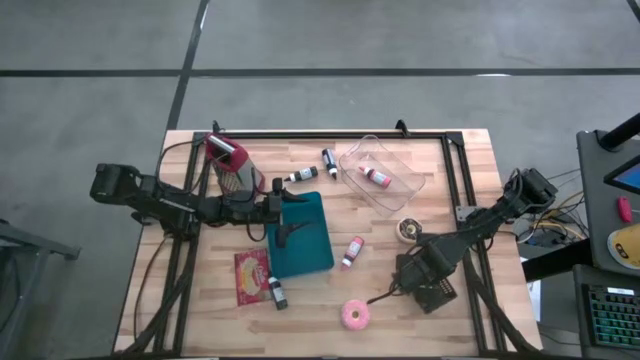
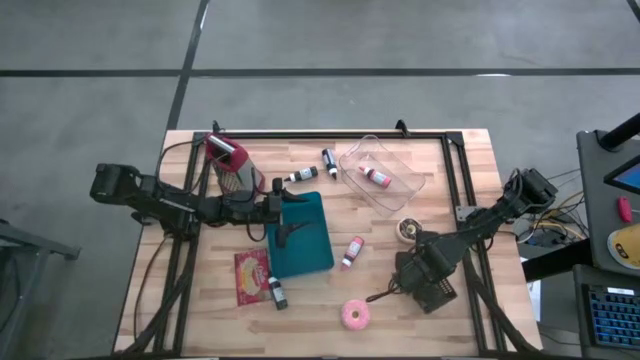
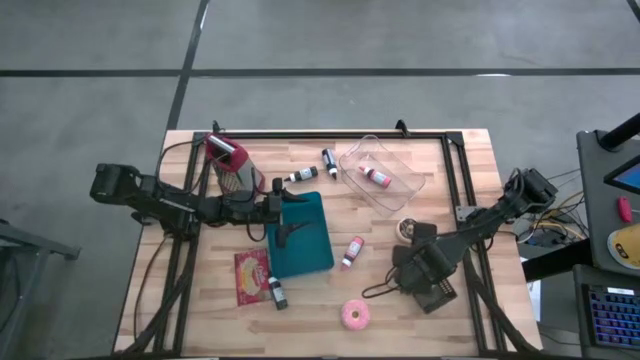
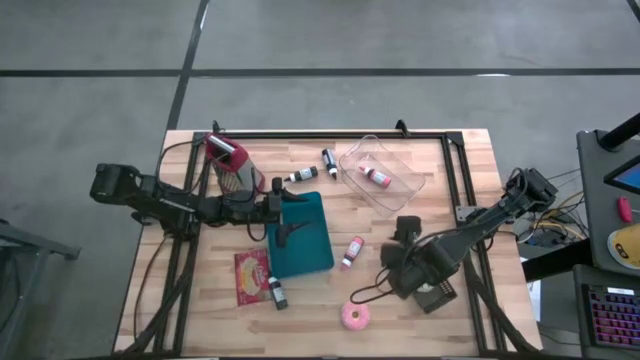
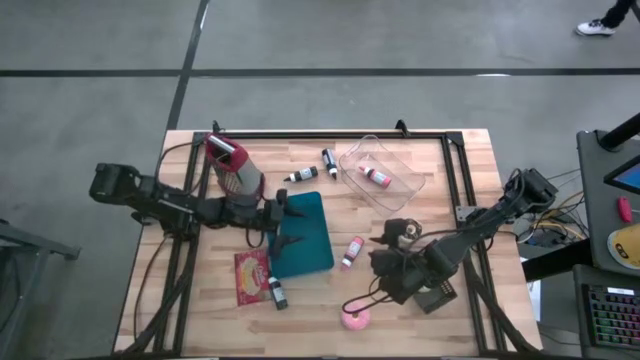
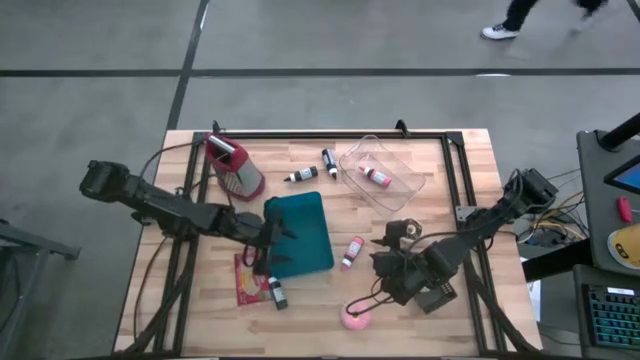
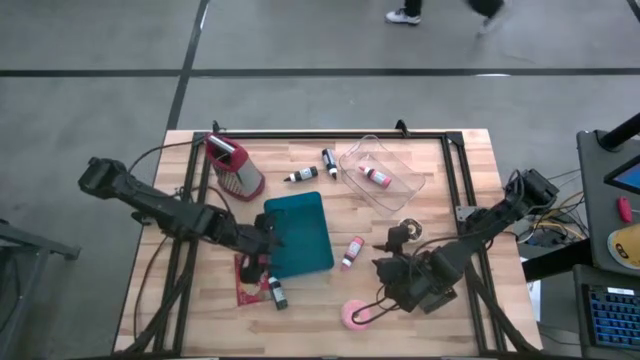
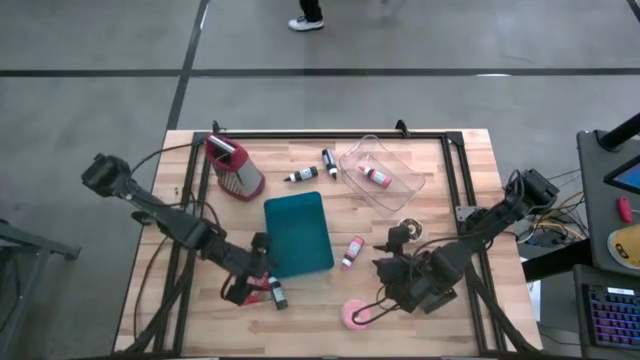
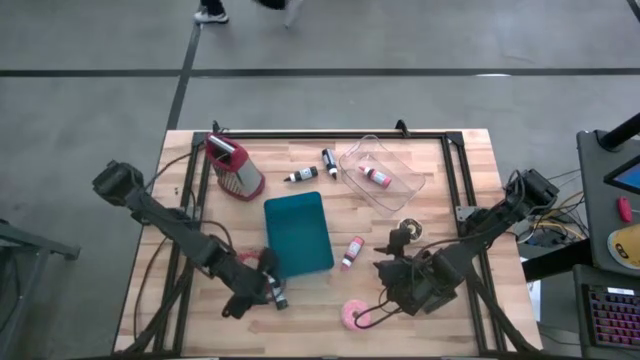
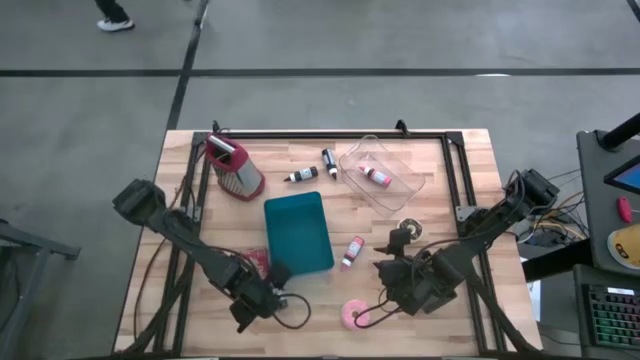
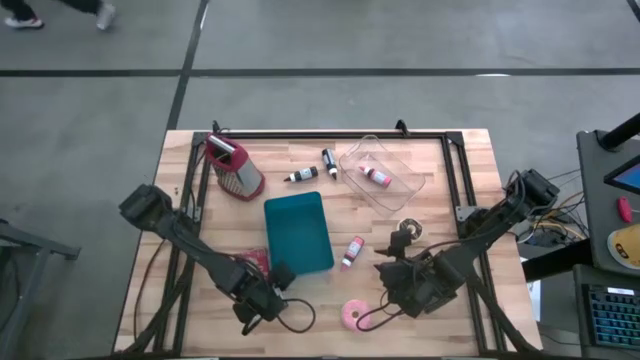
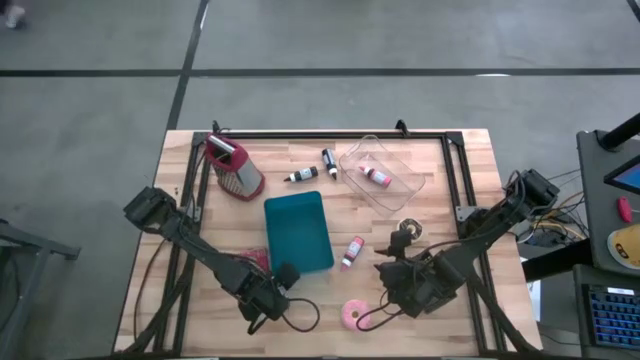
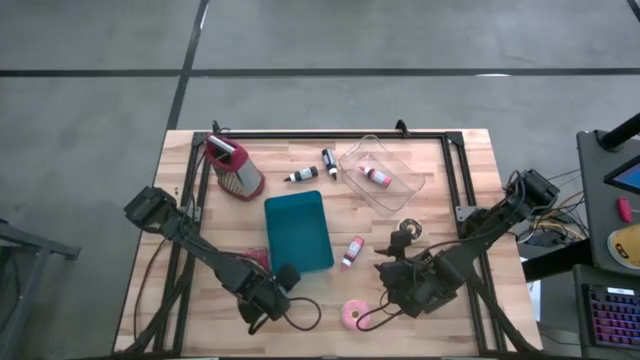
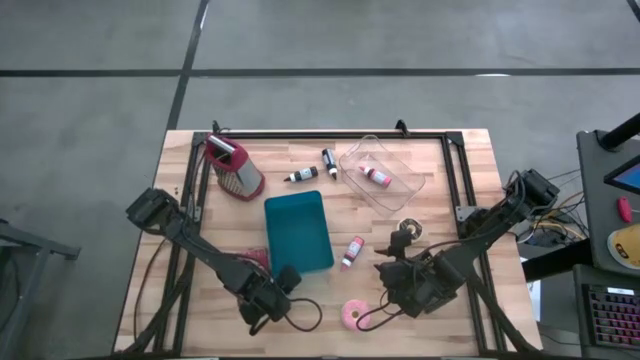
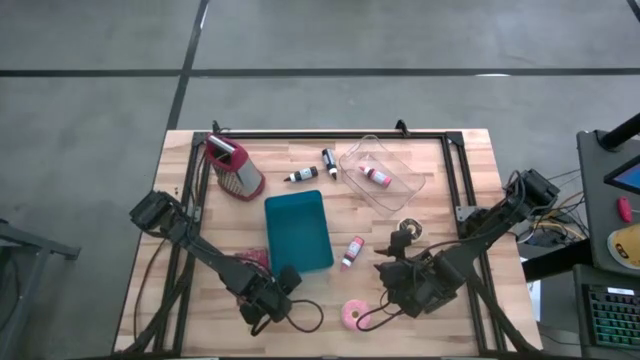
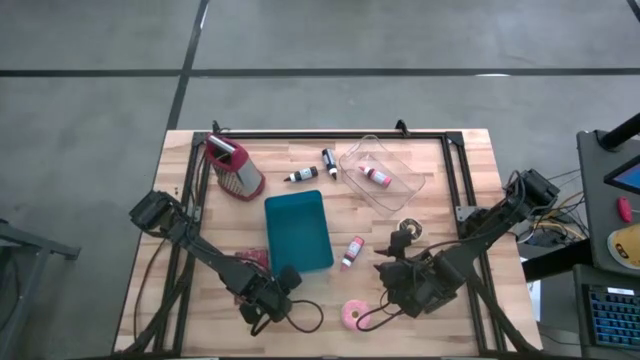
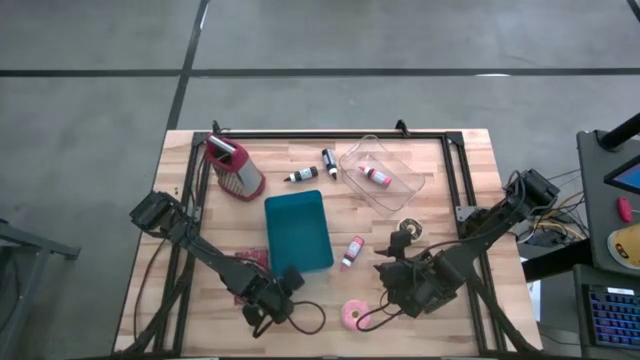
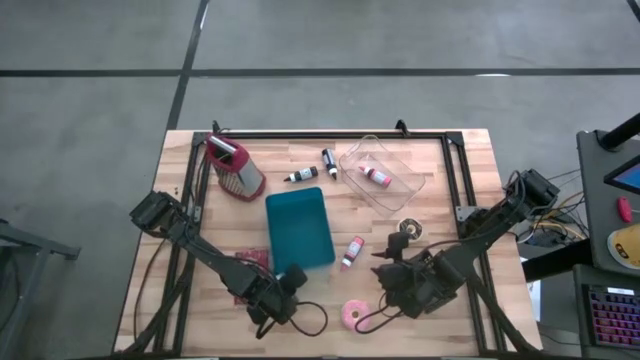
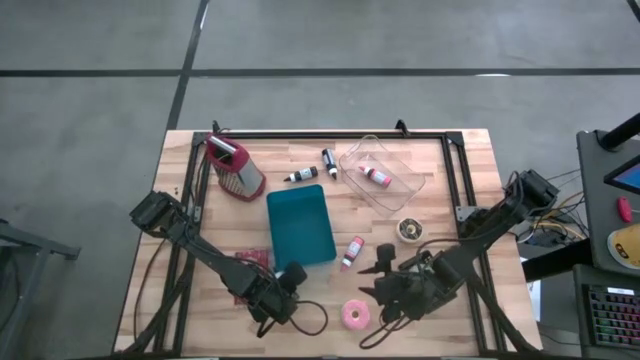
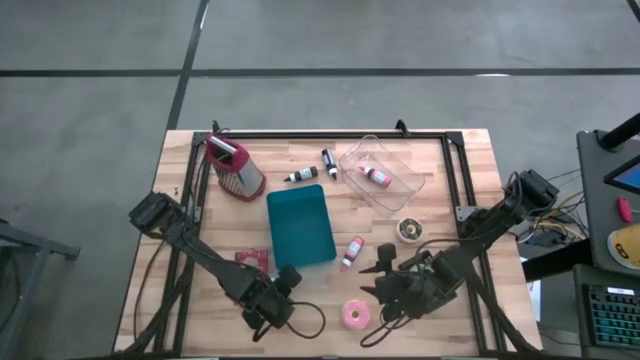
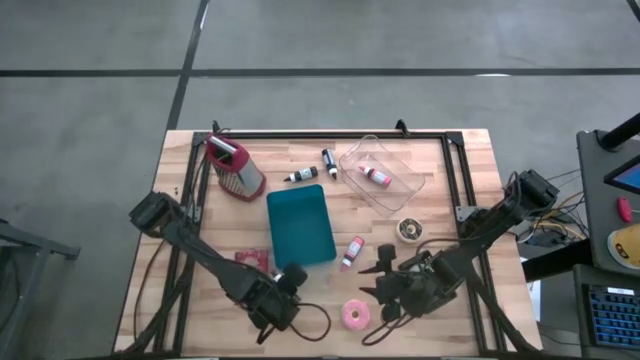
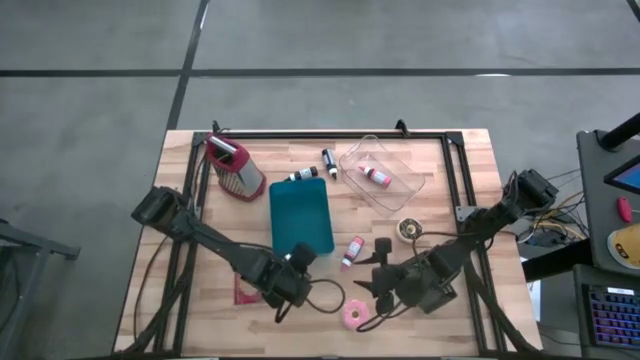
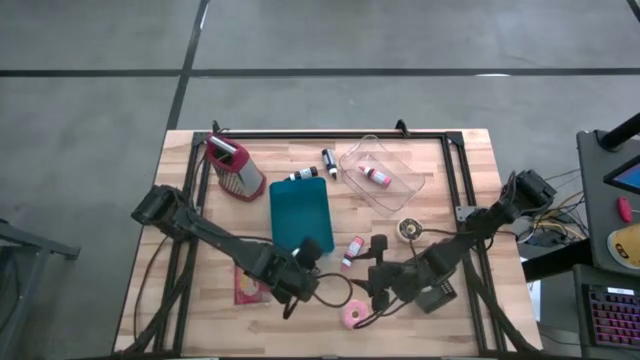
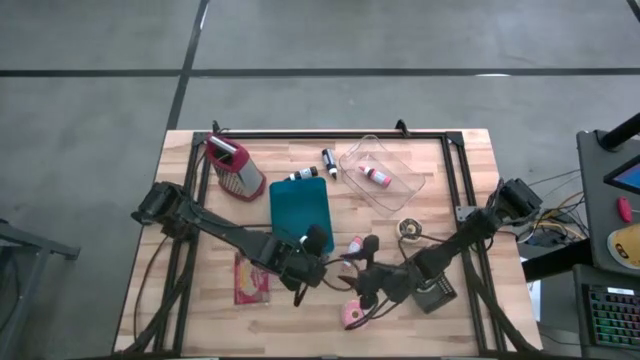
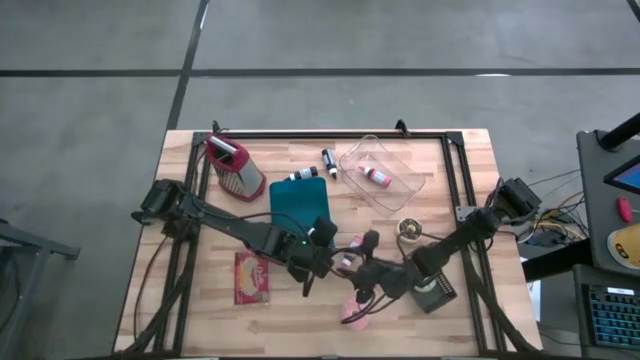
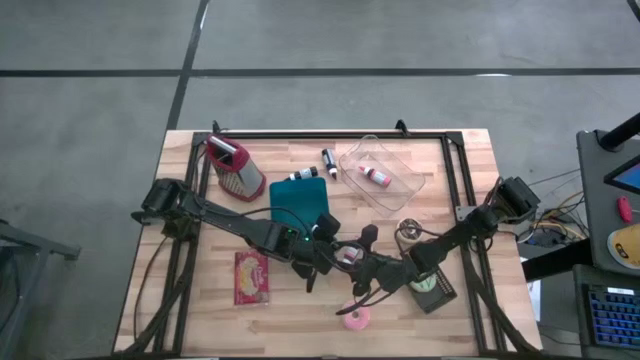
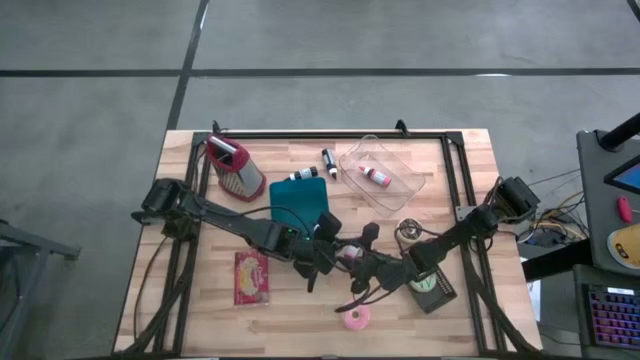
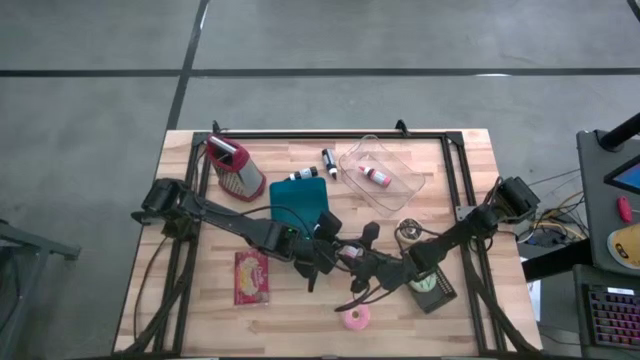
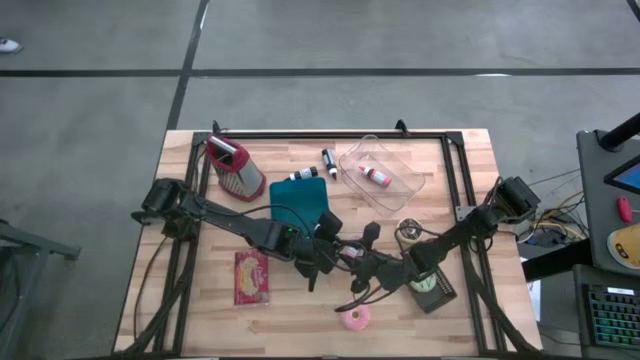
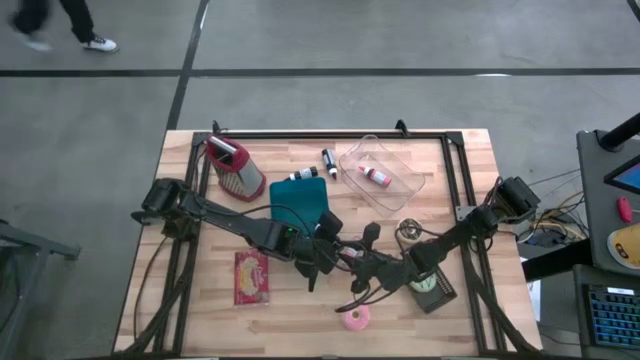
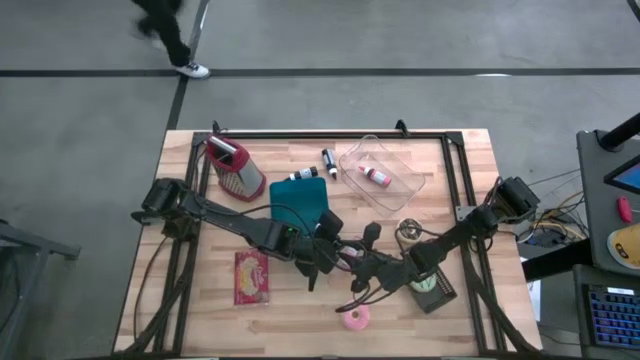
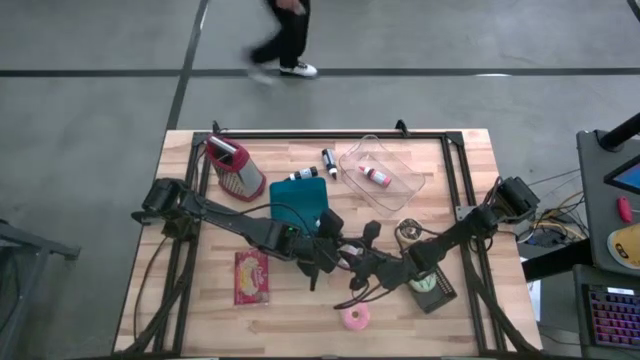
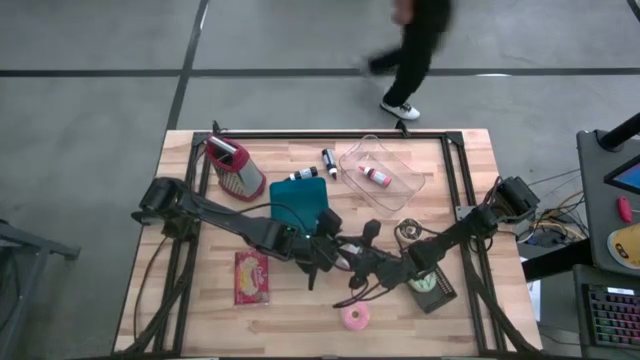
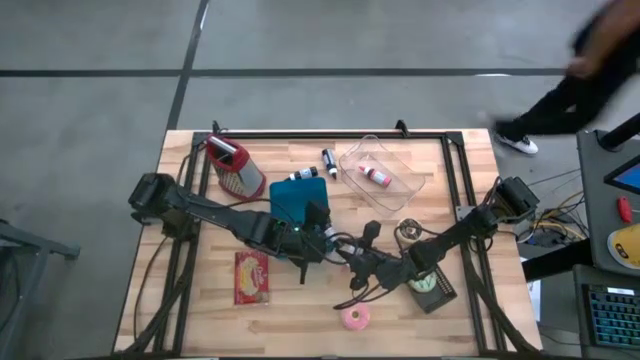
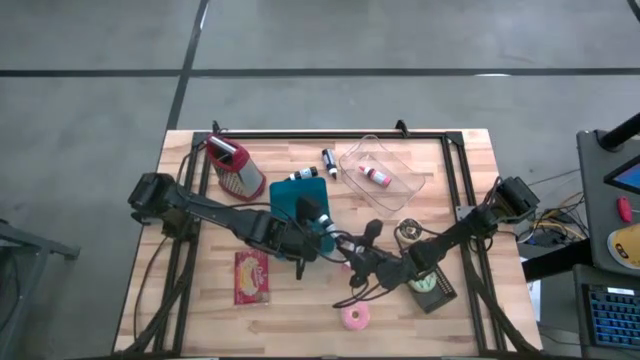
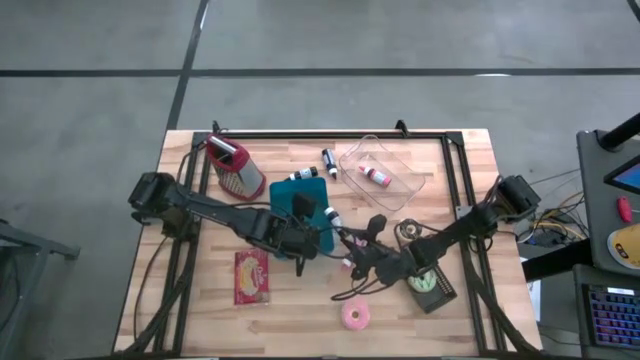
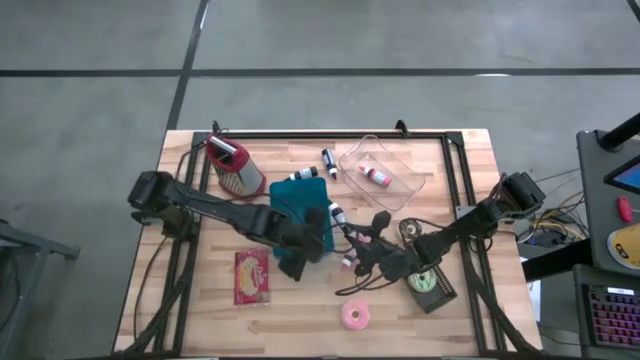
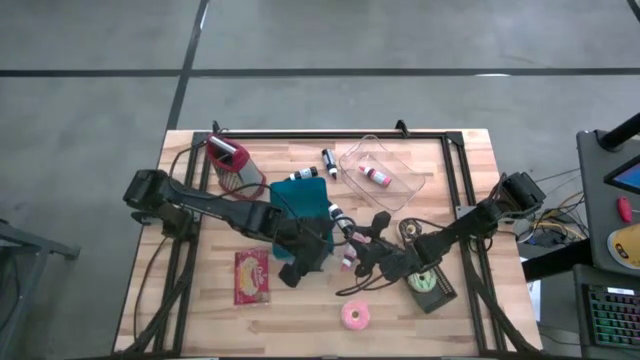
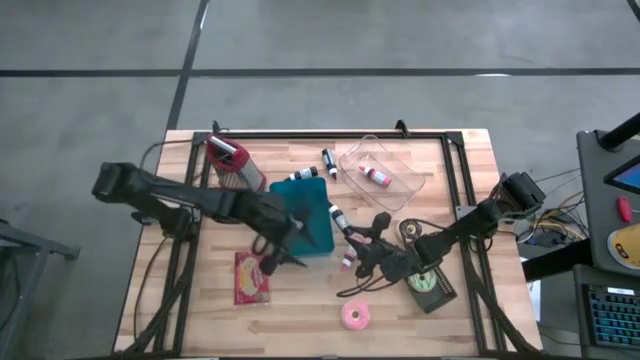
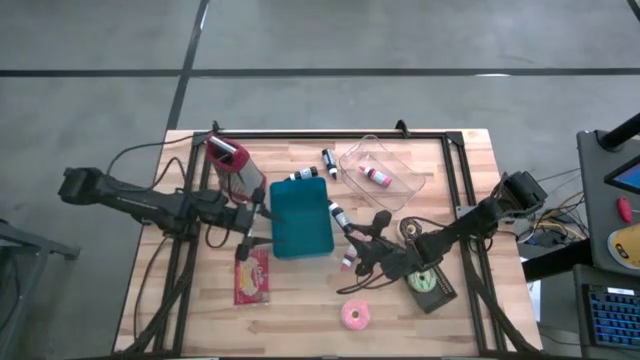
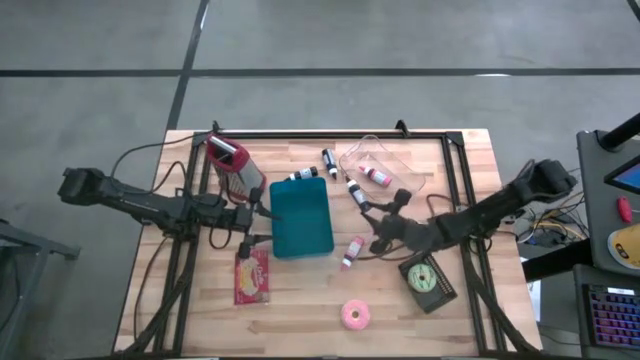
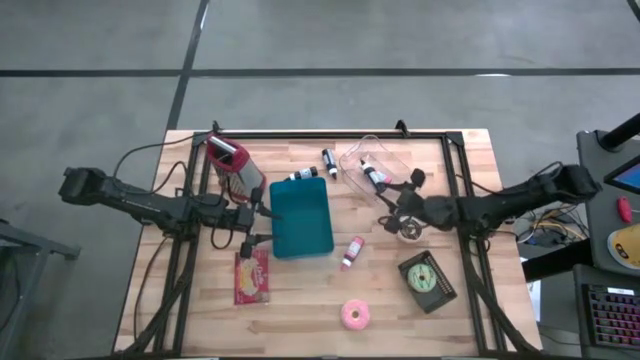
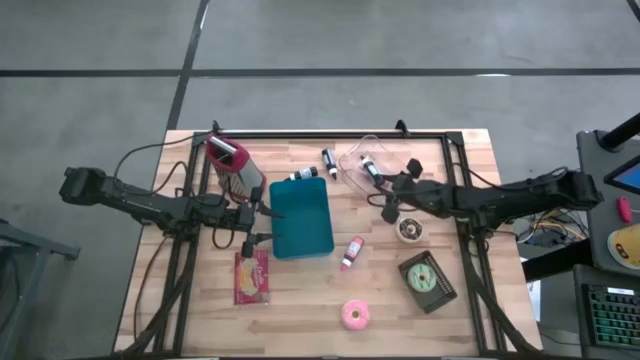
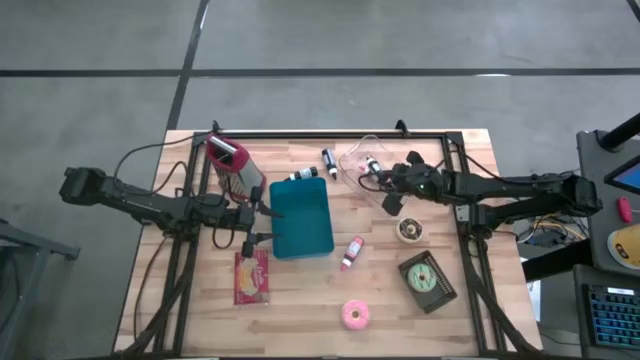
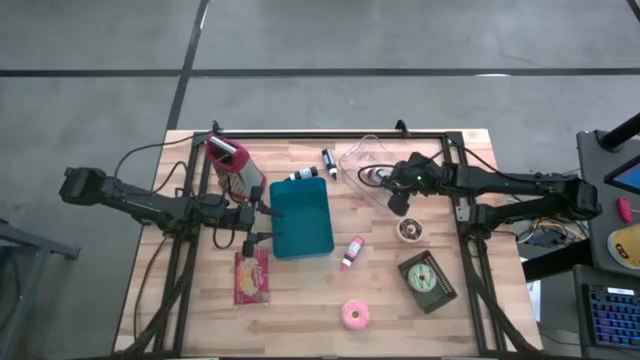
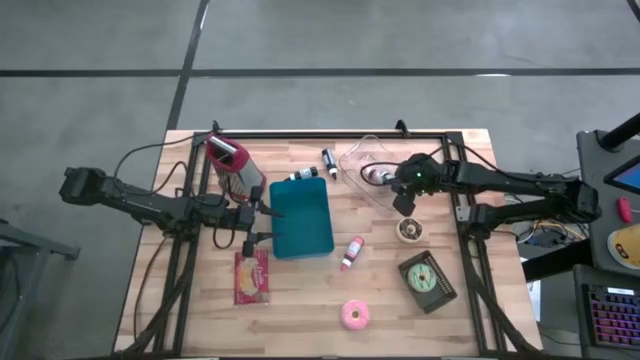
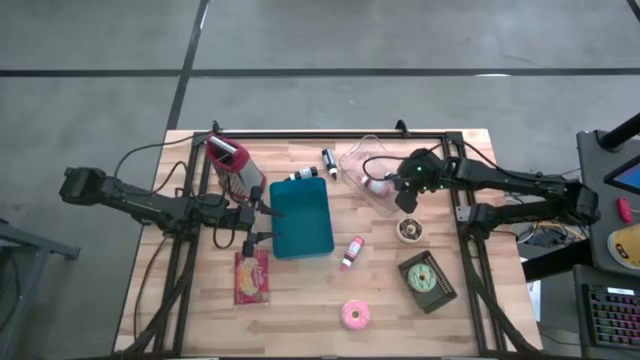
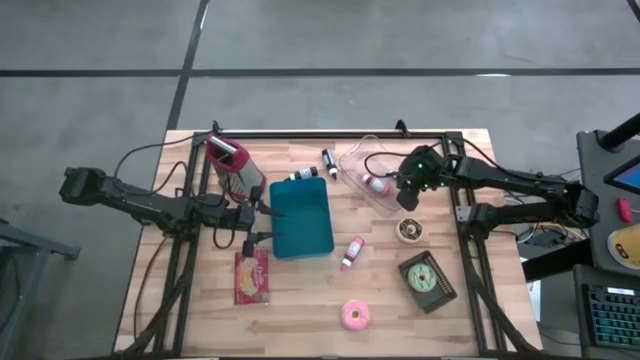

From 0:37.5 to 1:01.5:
Task: Pick & Place Food Item
Put the bottom black food coloring bottle into the transparent bin
